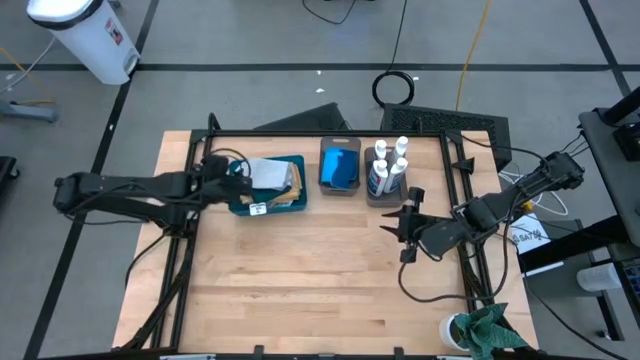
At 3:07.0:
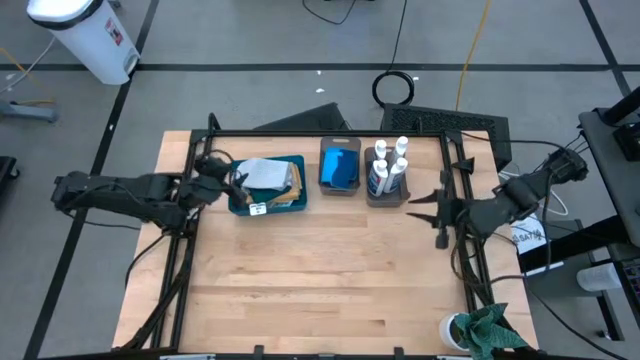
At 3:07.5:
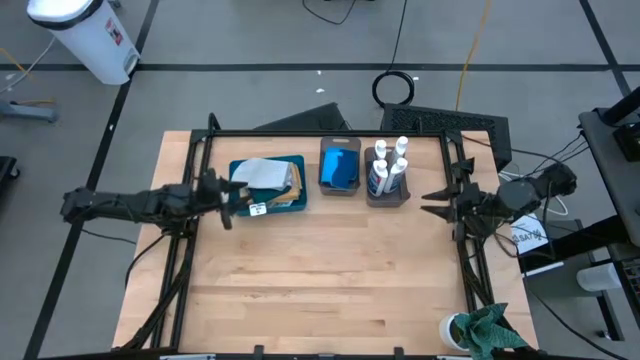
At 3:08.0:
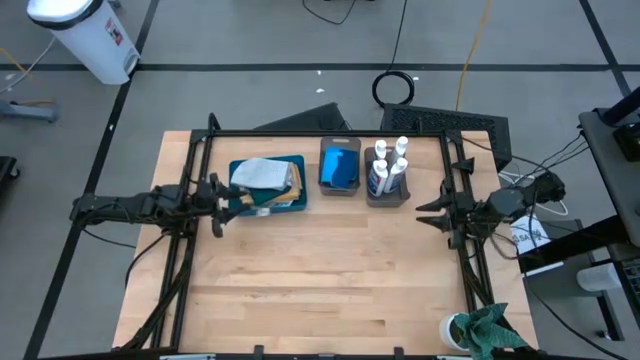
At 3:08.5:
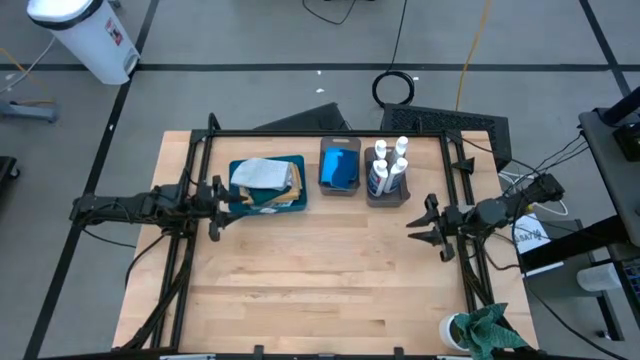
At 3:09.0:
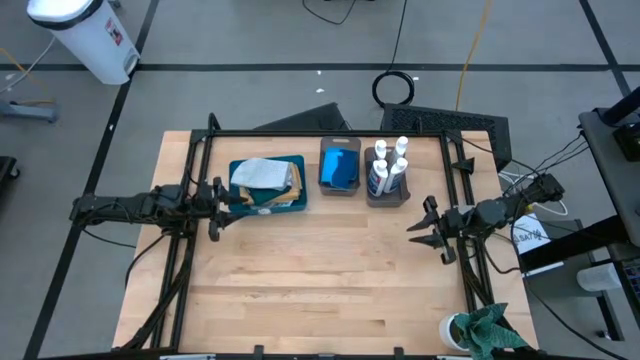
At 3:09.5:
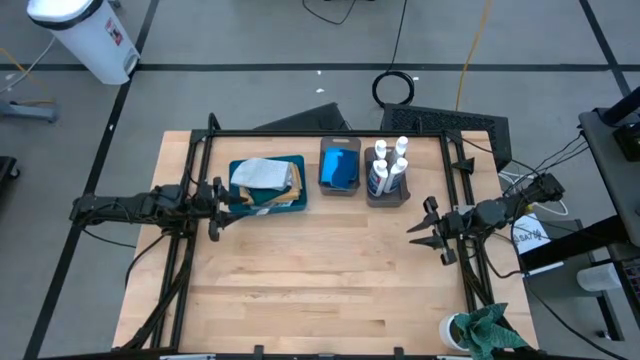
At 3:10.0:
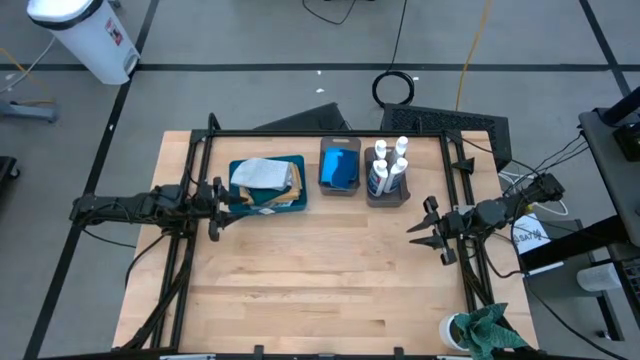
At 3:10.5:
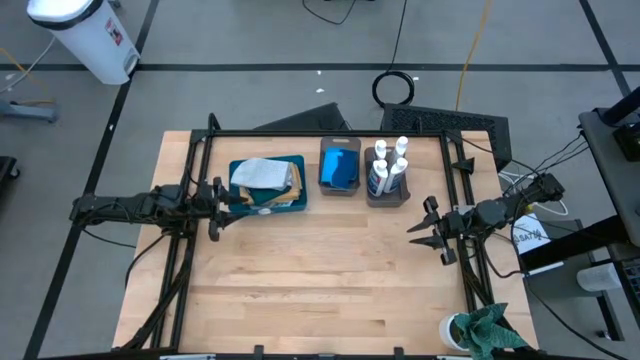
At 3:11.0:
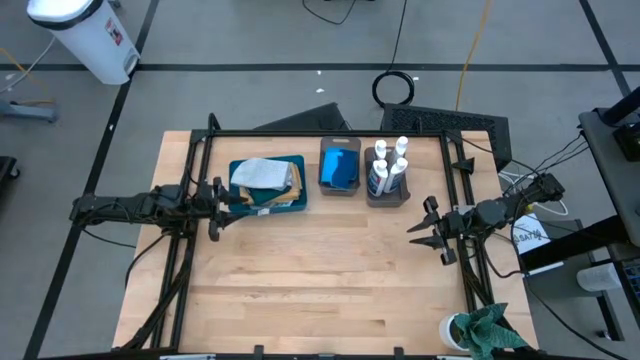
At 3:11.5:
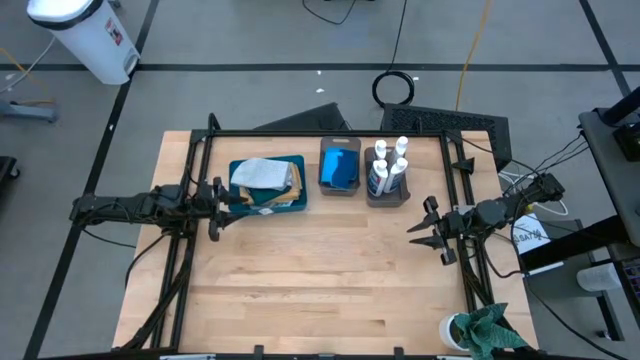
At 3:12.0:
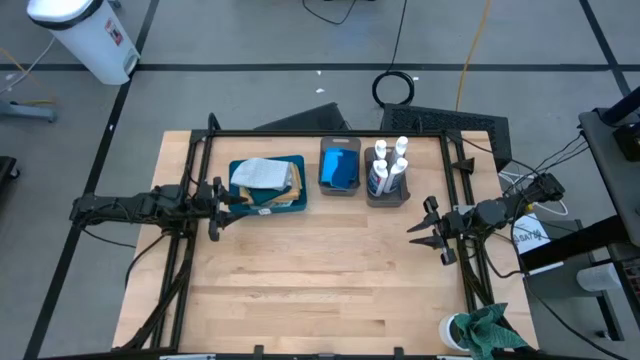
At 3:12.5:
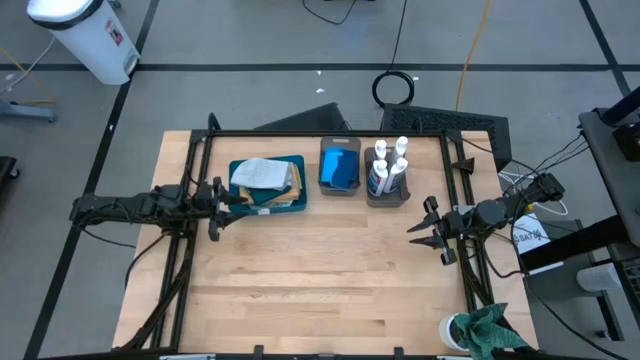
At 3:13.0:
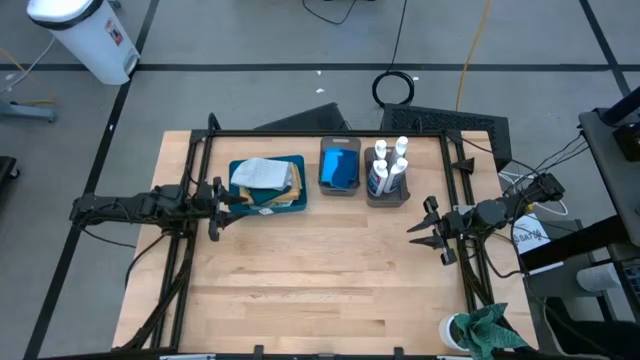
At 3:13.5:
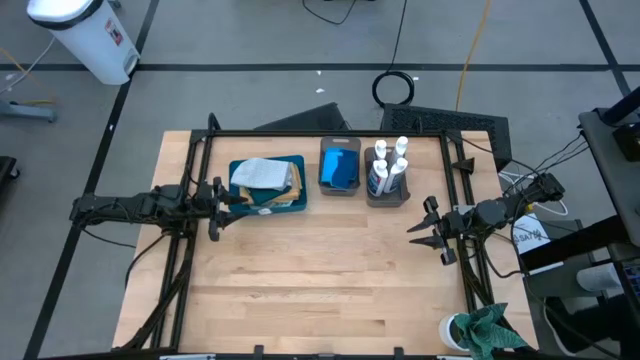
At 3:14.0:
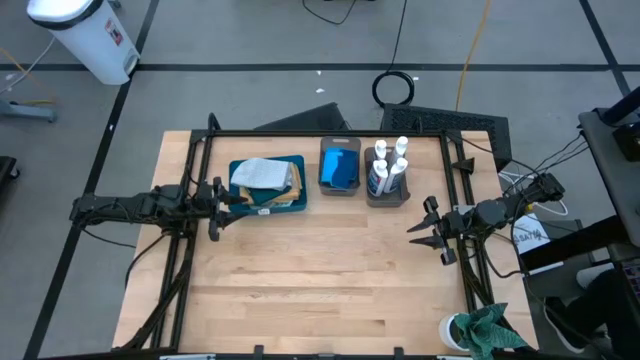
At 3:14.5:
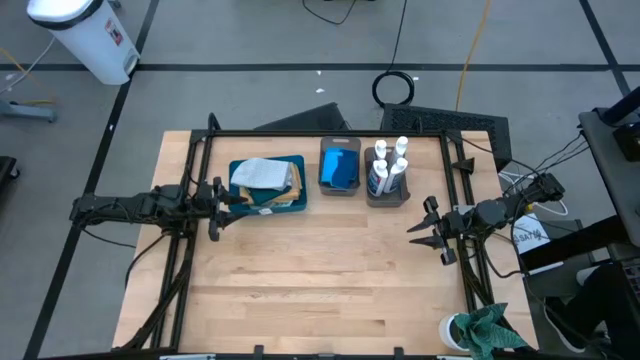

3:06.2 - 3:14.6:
Task: Pick & Place Kitchen Items
Return to Home Position

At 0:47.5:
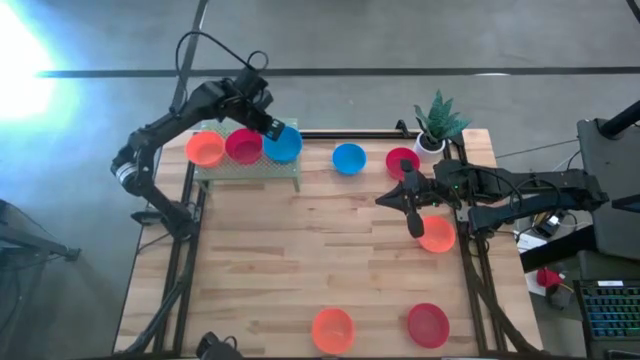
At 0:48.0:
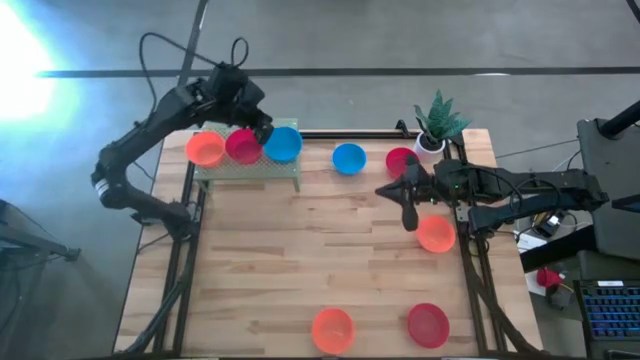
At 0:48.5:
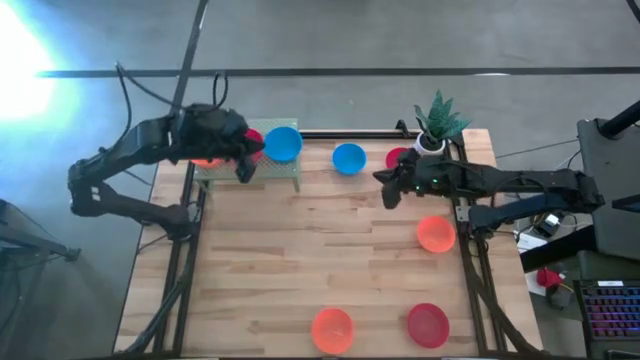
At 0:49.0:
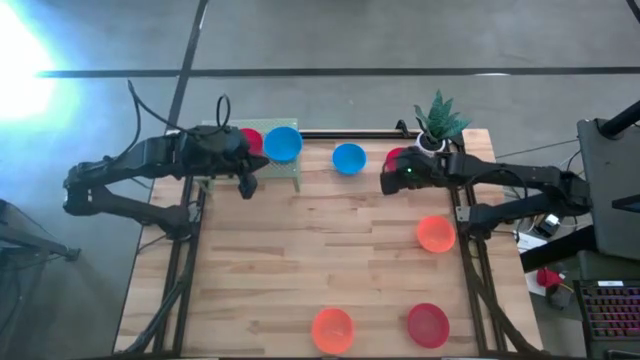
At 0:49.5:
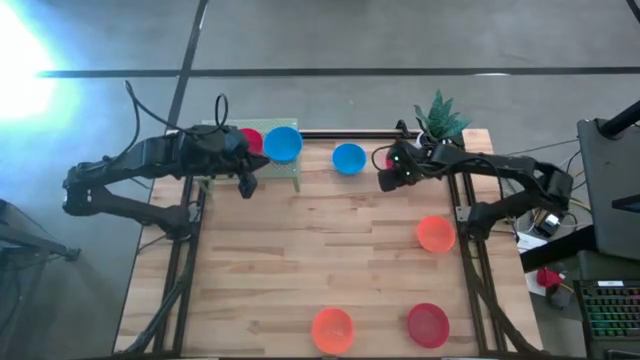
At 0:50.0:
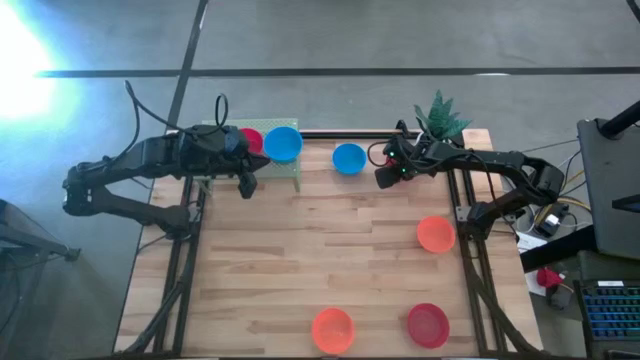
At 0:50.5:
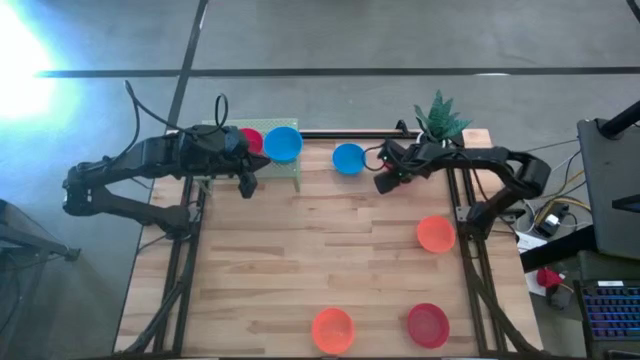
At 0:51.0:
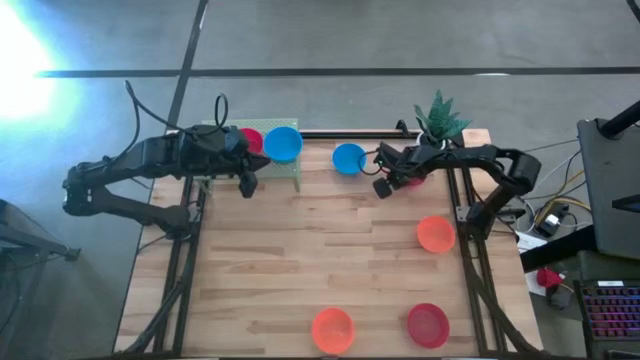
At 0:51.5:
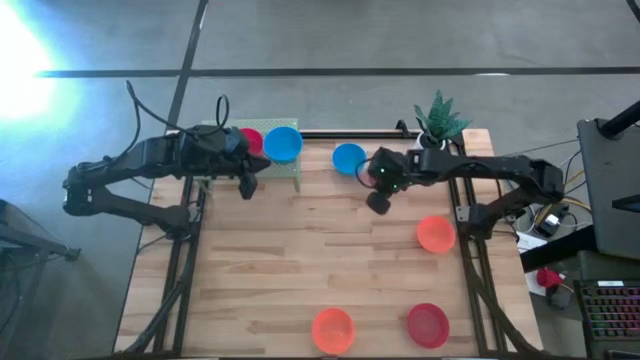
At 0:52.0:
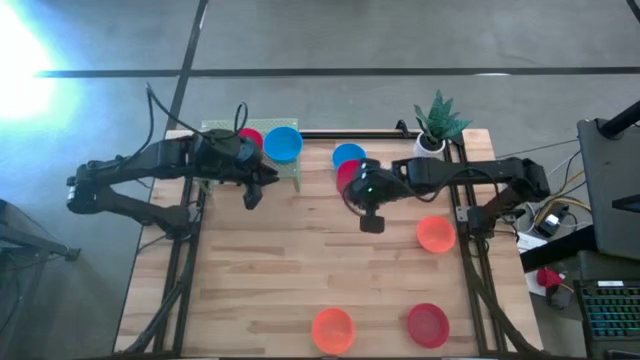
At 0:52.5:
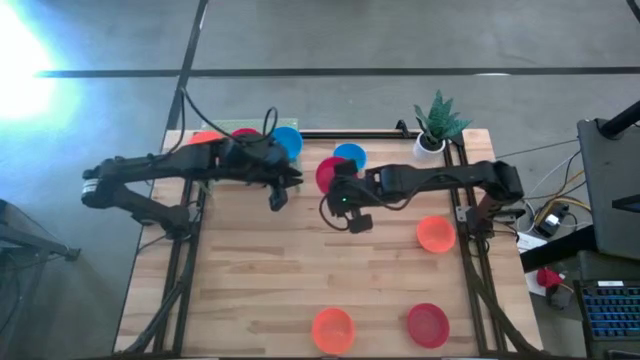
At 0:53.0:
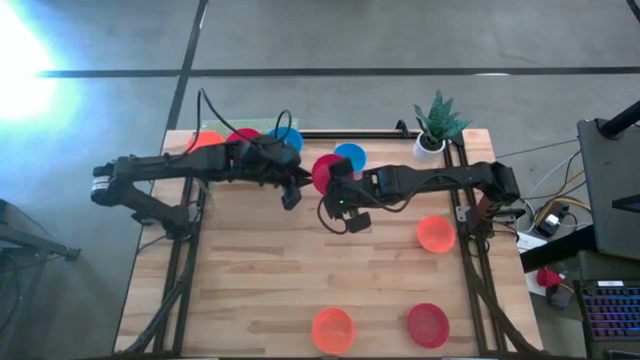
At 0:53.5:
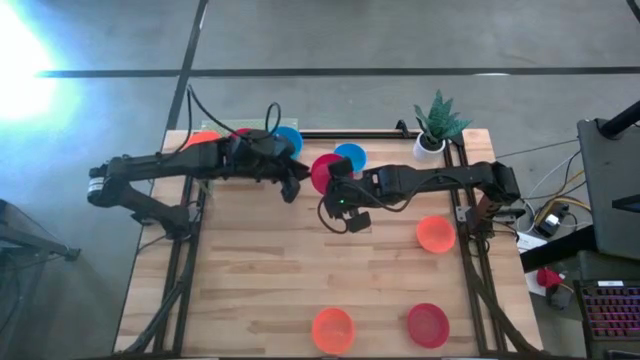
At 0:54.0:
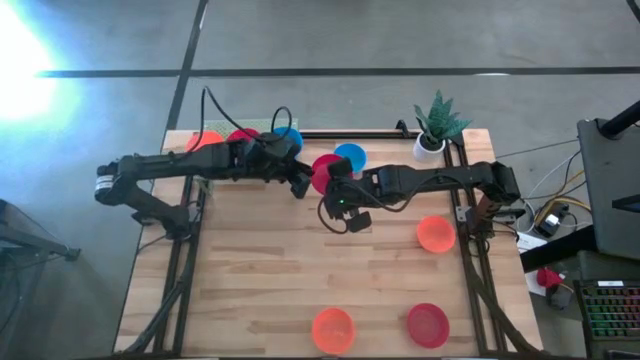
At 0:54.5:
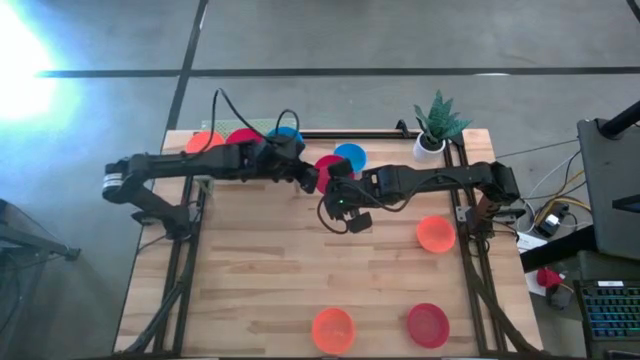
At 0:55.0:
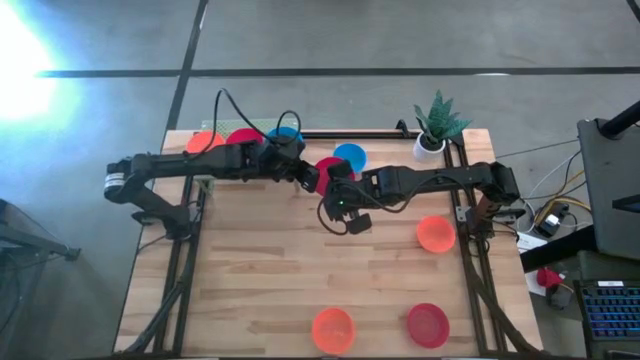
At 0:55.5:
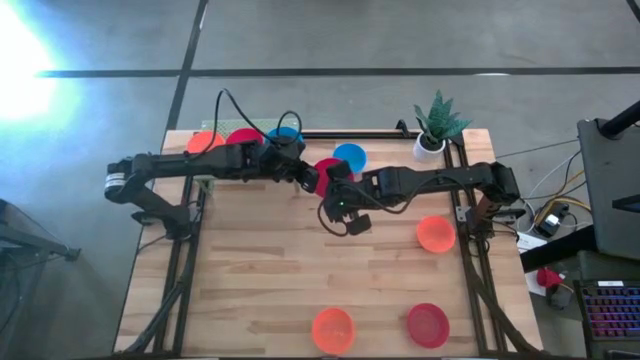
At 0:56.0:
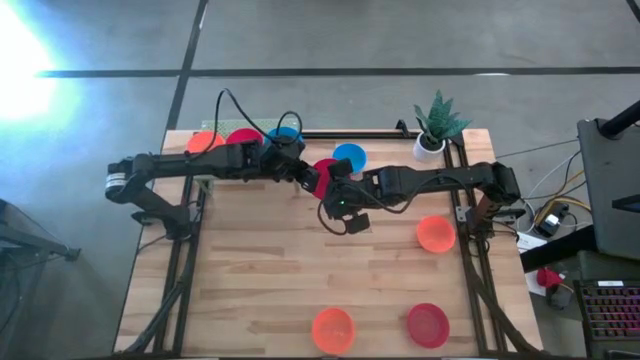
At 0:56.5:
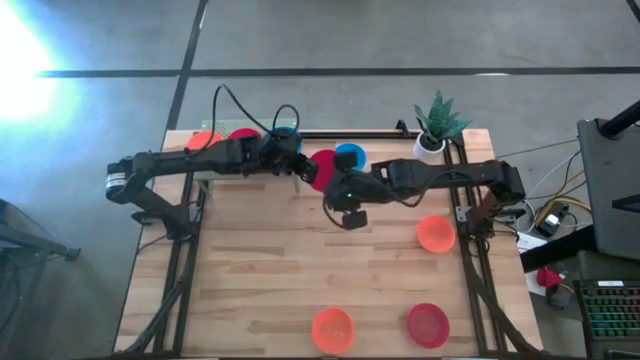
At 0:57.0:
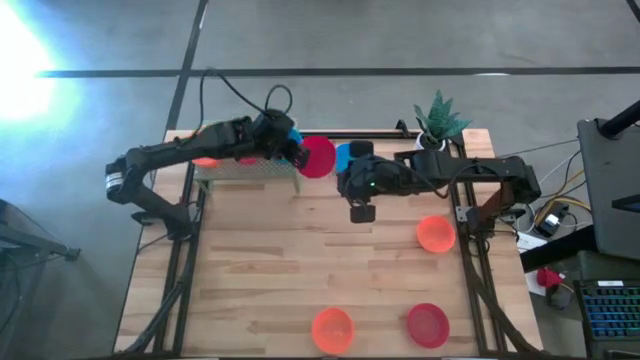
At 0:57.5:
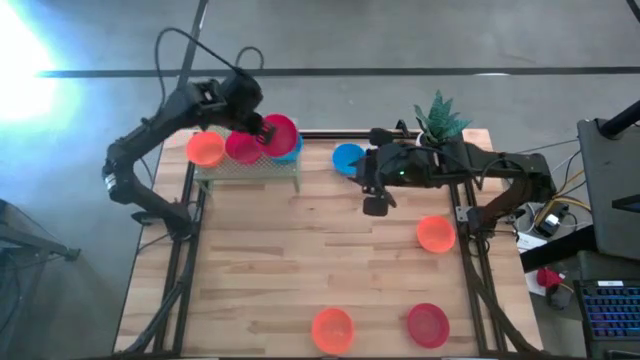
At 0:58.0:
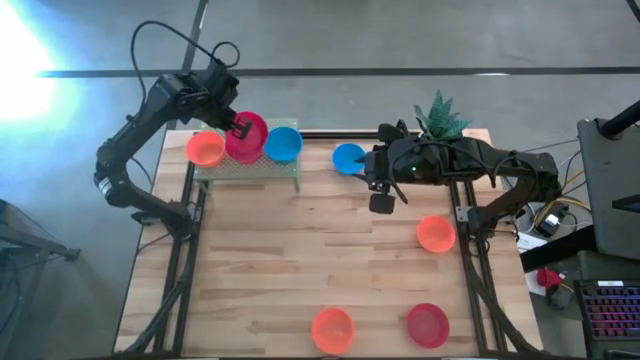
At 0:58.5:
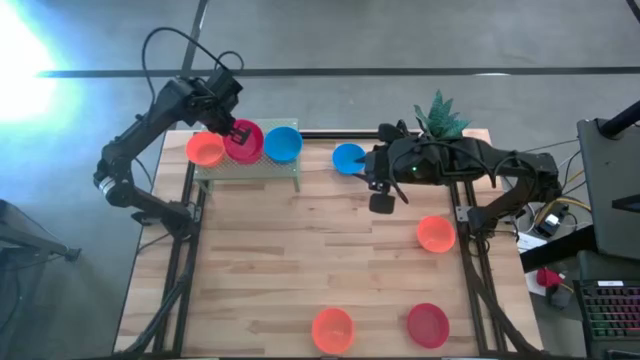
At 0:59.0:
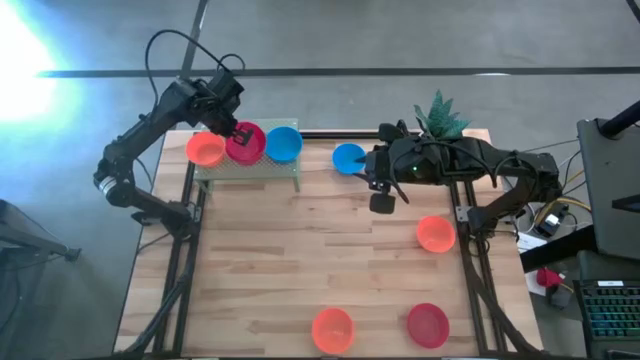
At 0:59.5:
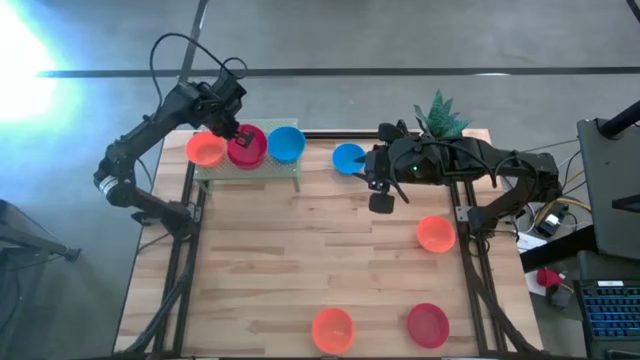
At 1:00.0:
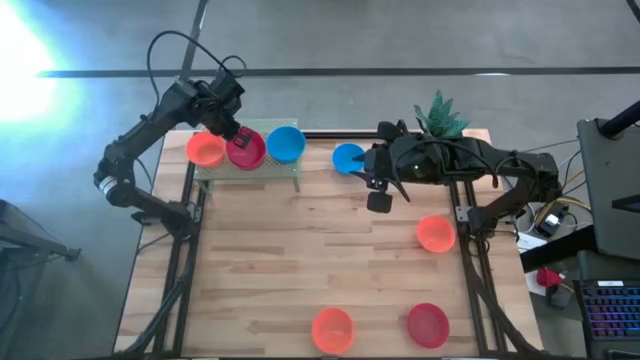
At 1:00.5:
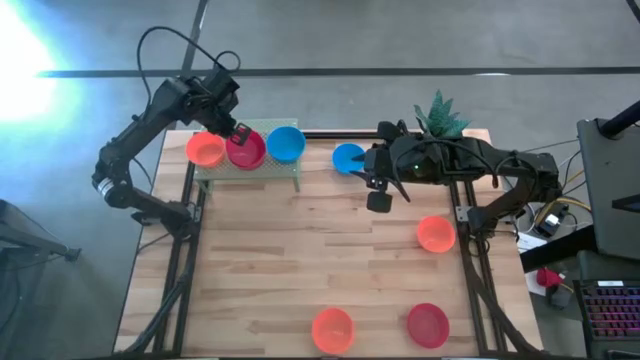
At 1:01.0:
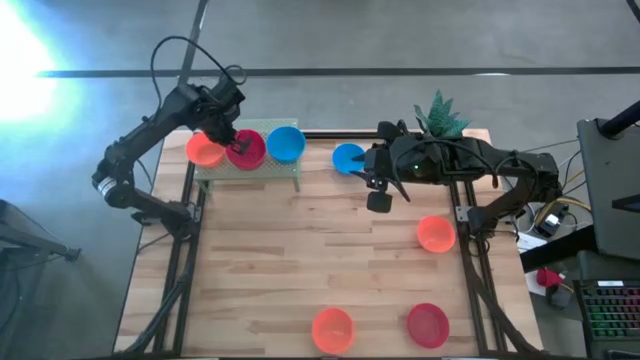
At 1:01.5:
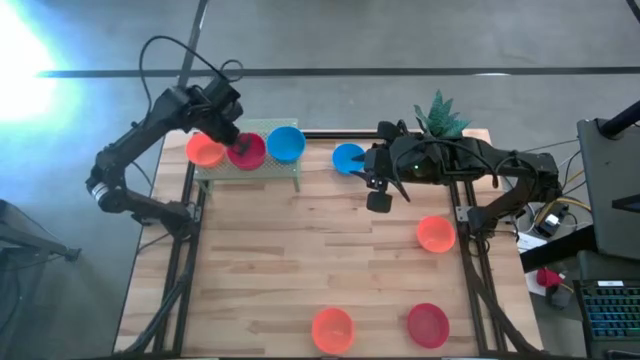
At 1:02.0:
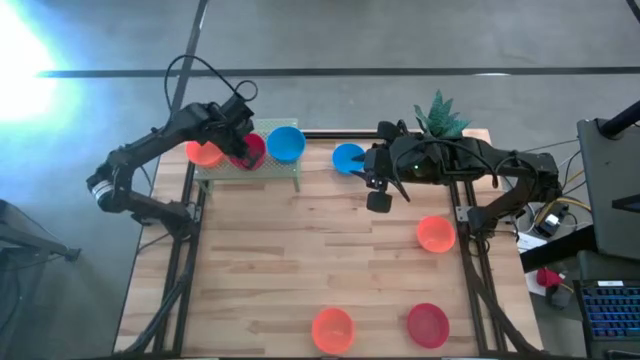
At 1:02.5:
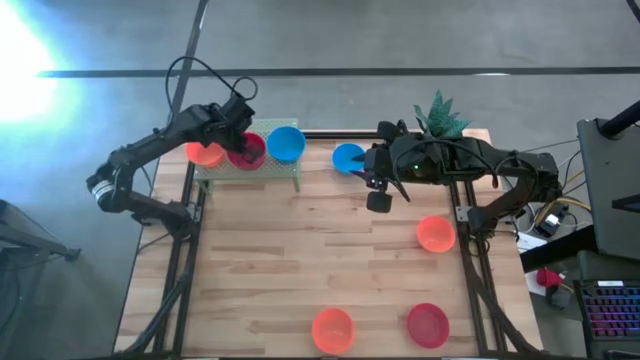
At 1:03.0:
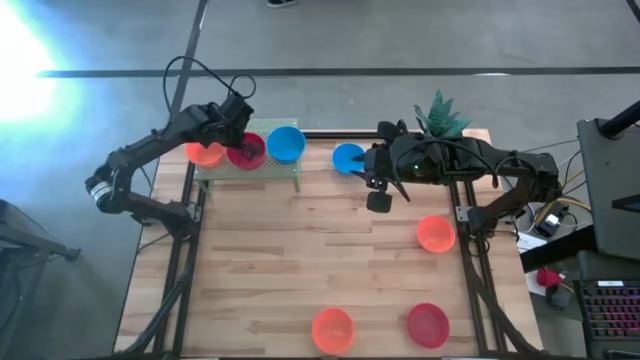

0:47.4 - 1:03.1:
Task: Pick & Place Mini bowls
Stack the top red bowl on top of the other red bowl on the shelf
